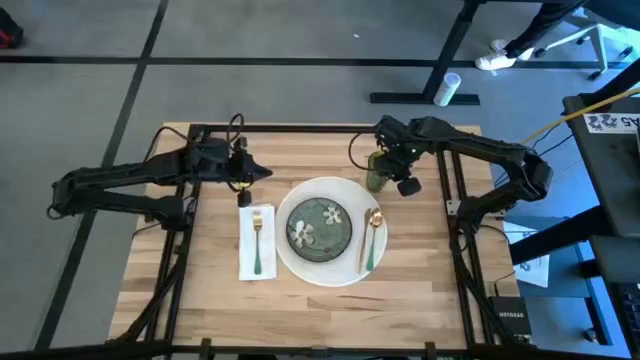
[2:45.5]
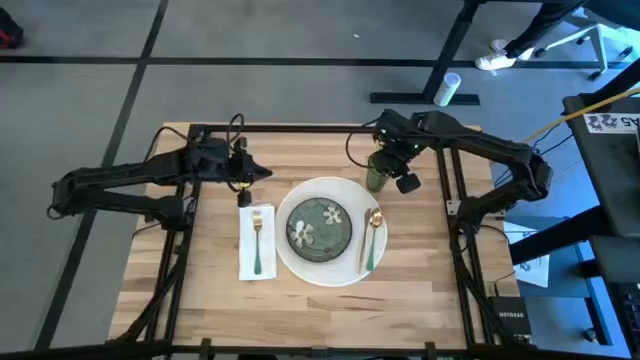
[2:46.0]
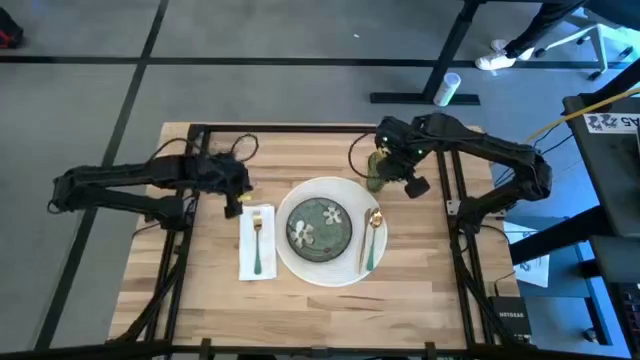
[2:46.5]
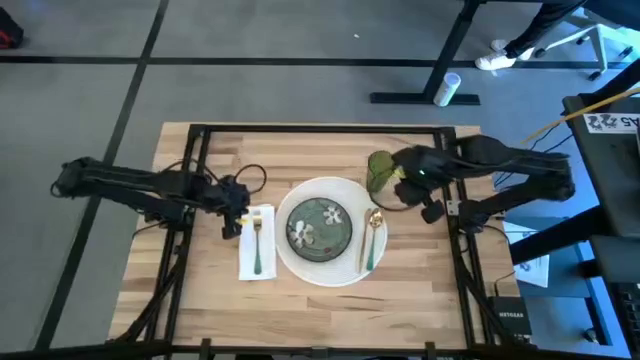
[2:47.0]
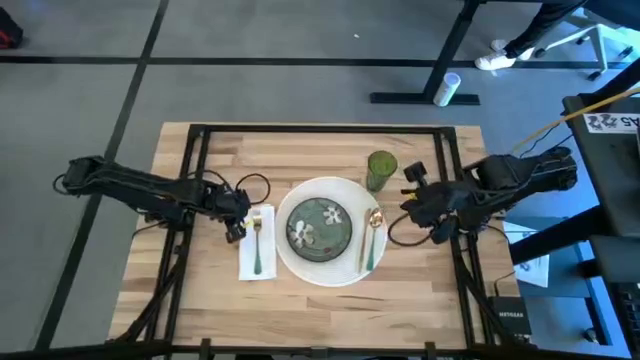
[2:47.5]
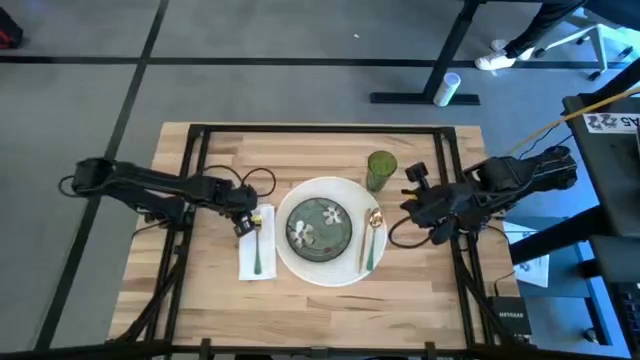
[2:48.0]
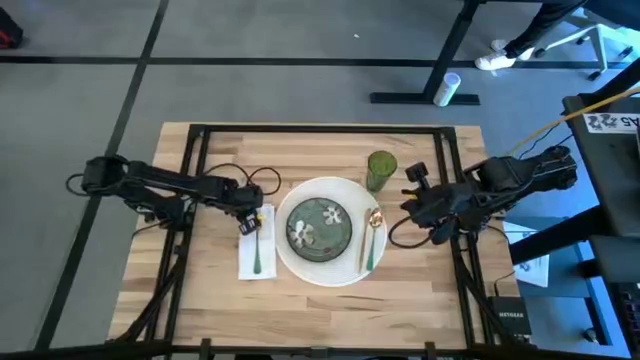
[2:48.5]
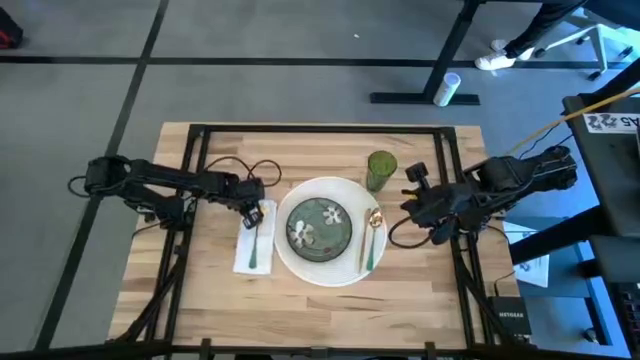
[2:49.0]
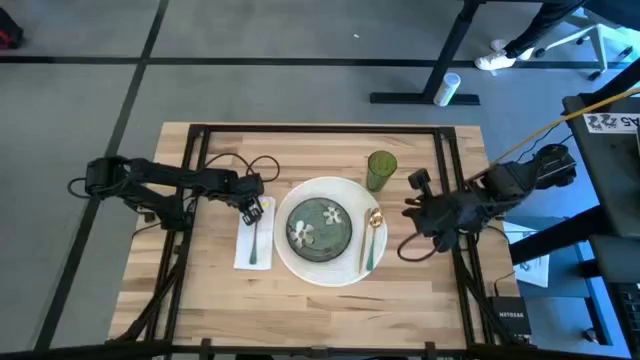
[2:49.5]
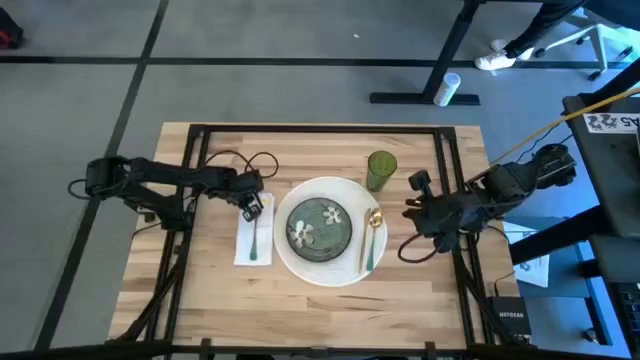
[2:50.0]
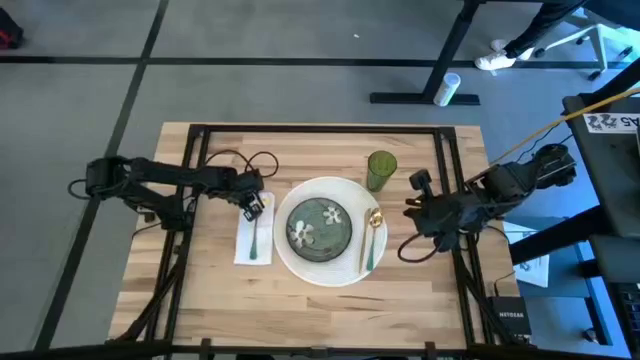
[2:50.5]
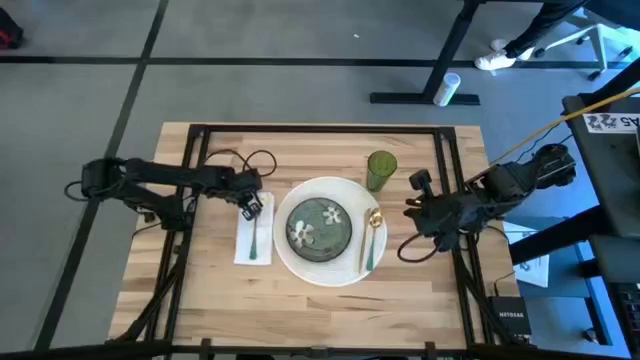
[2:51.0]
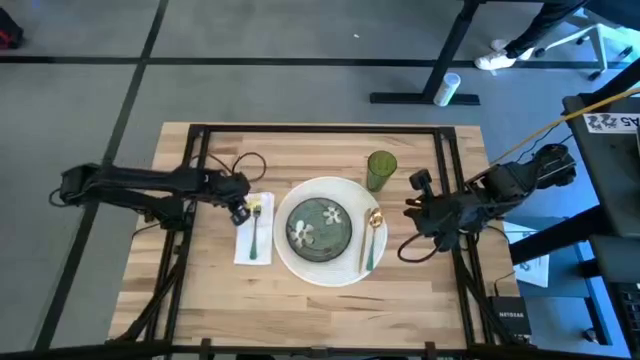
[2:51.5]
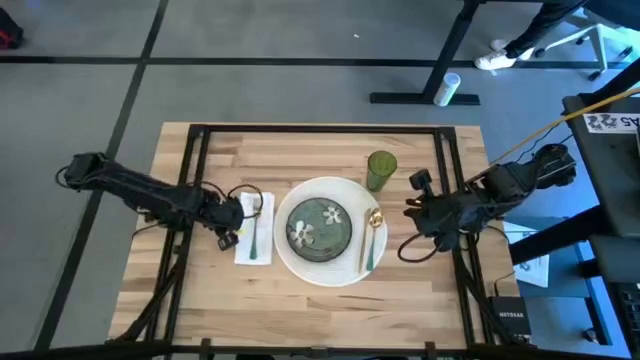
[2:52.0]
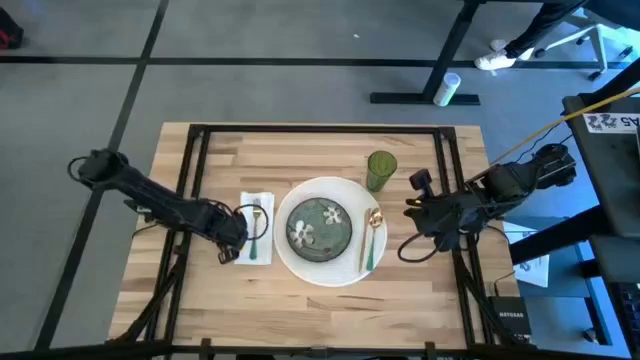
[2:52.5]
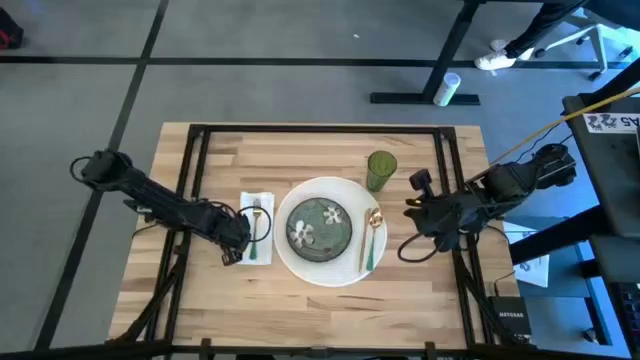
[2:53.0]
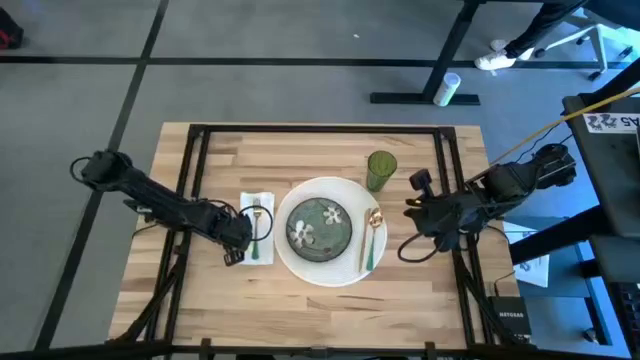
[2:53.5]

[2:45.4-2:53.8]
Task: Set table place
Adjust the white table napkin

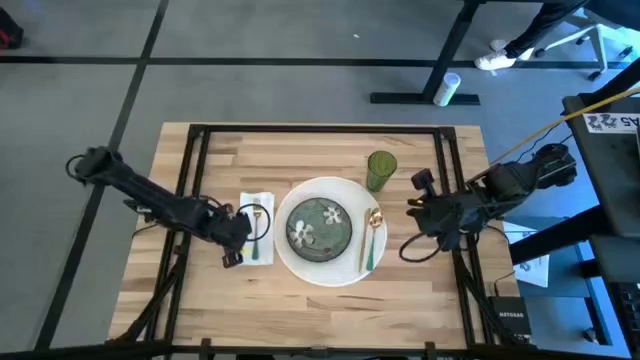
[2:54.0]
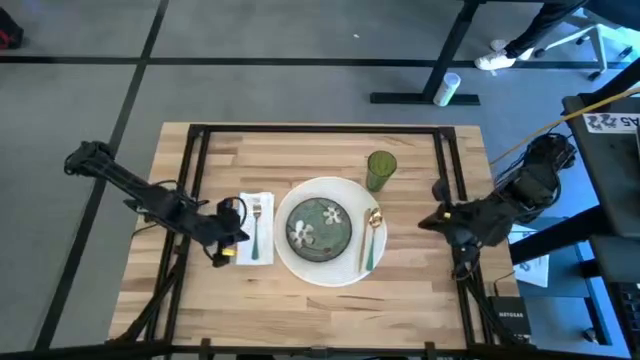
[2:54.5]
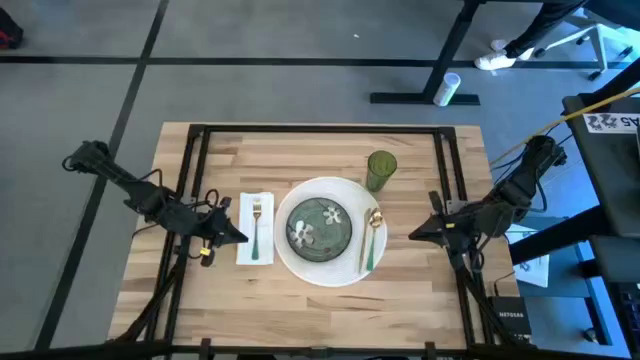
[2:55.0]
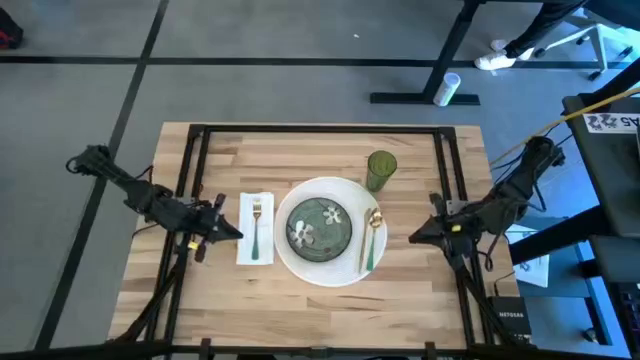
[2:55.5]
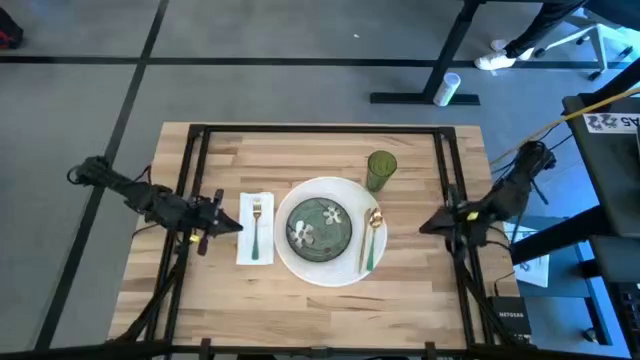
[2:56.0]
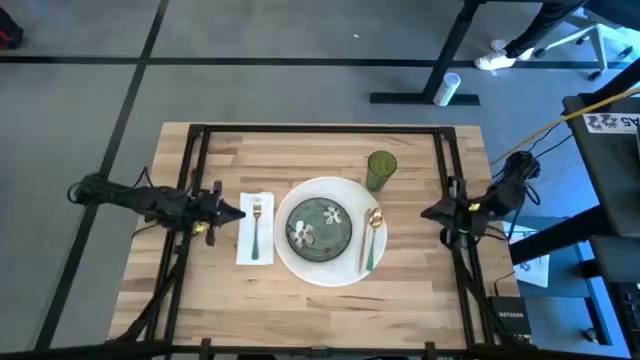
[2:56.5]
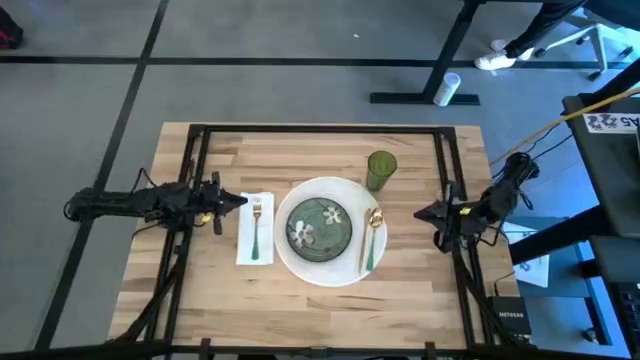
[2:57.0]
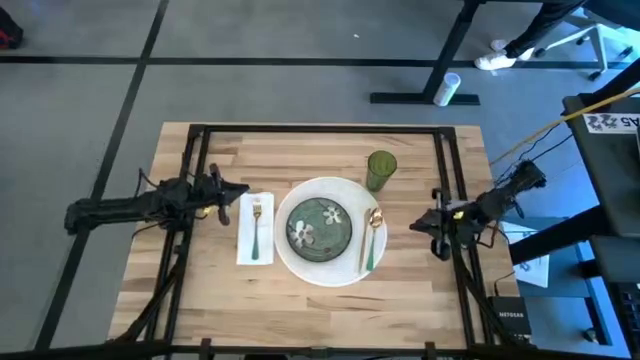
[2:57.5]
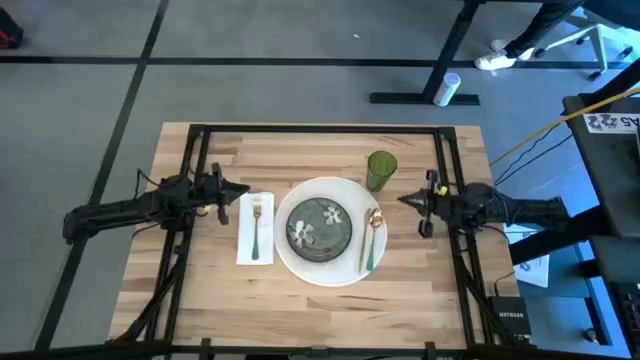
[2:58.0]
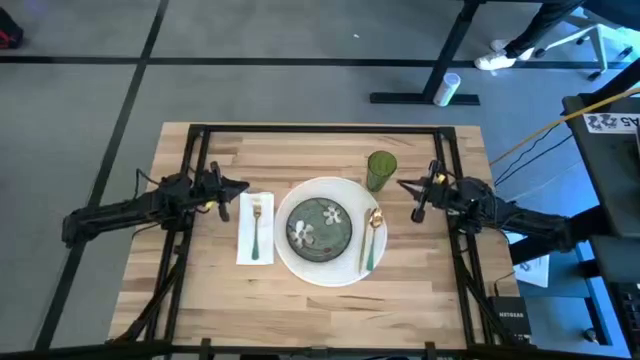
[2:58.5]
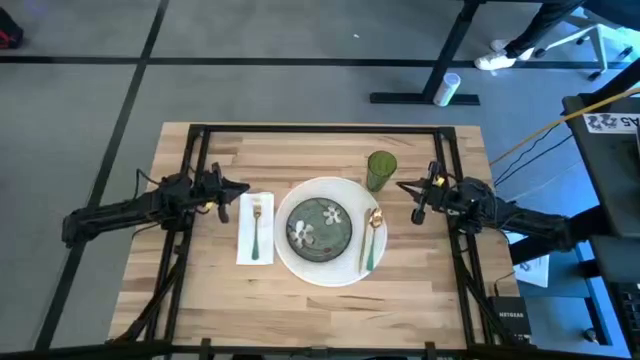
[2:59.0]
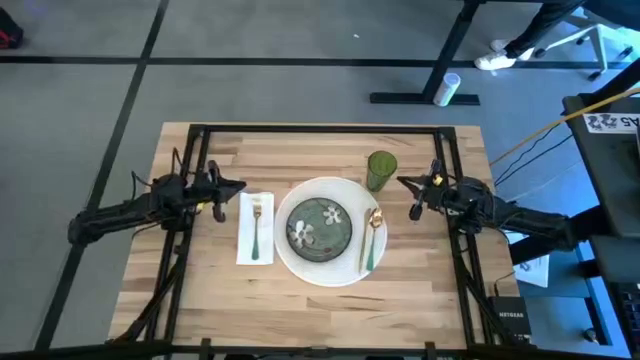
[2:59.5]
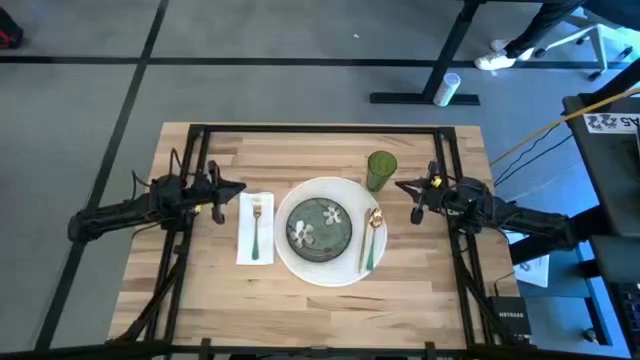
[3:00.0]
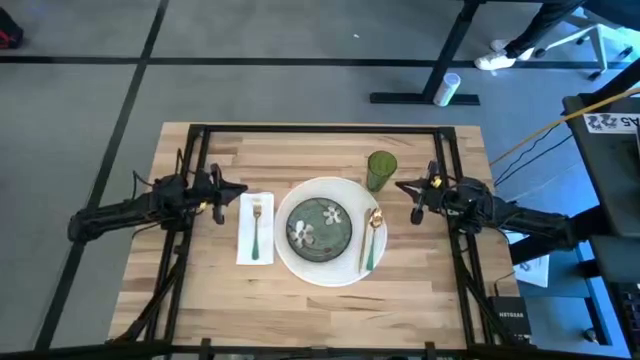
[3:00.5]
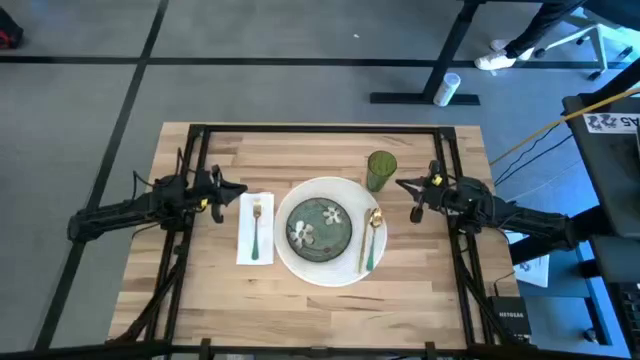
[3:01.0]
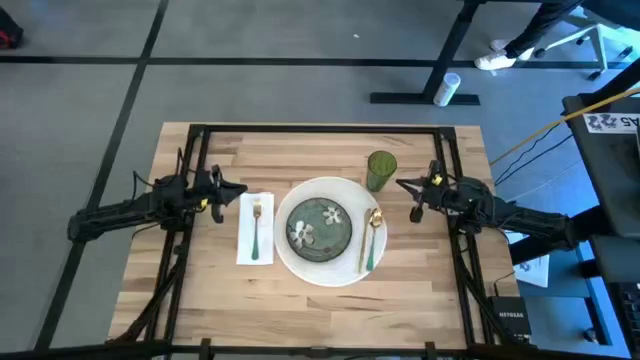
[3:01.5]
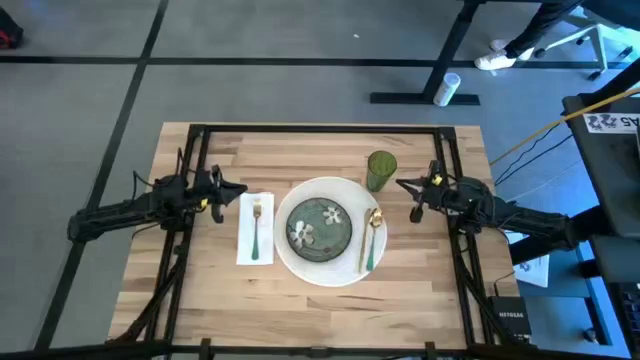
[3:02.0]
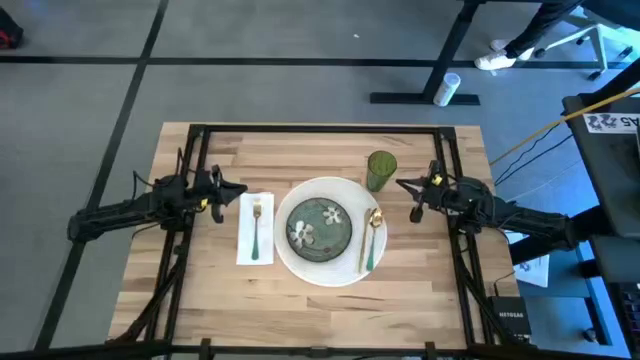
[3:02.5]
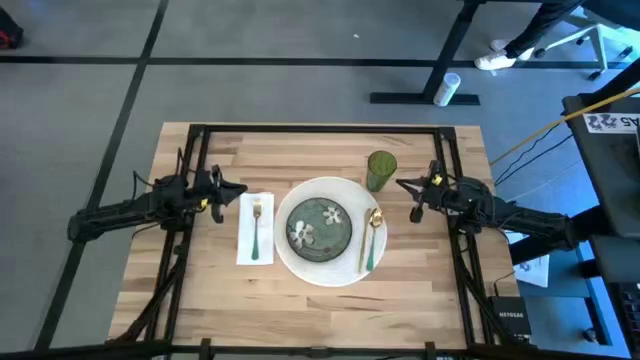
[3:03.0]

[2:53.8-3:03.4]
Return to Home Position

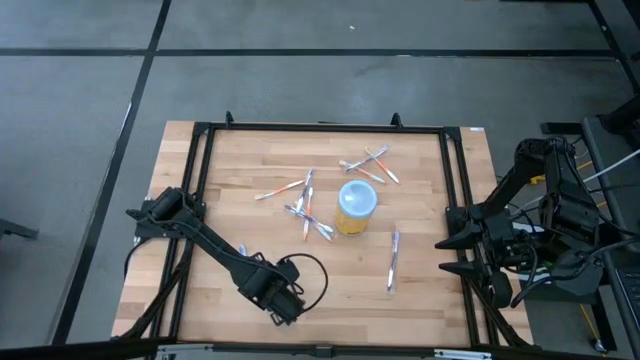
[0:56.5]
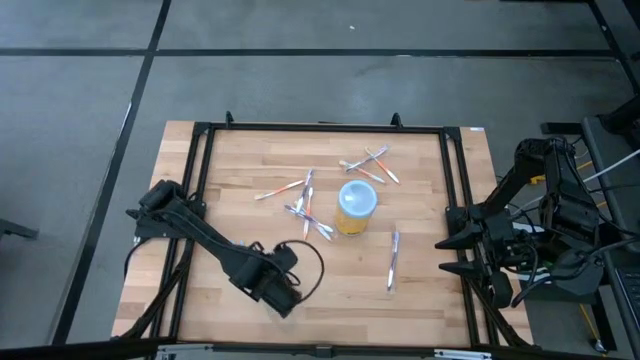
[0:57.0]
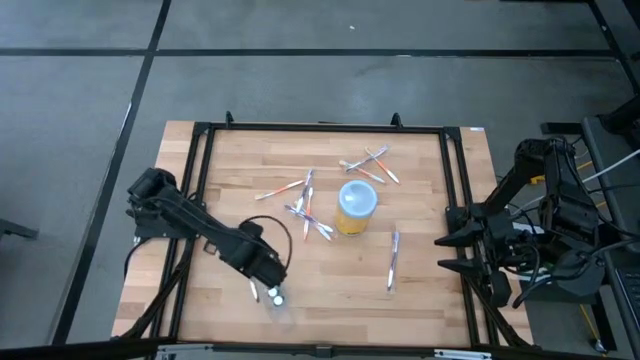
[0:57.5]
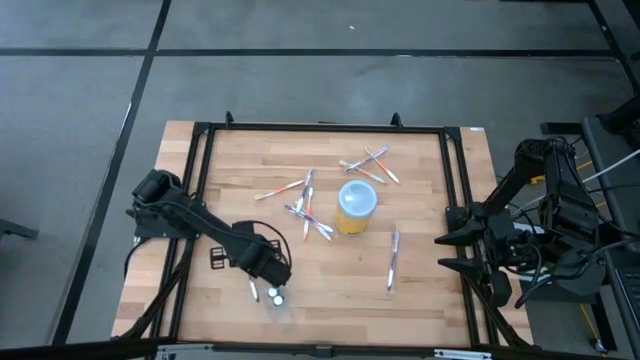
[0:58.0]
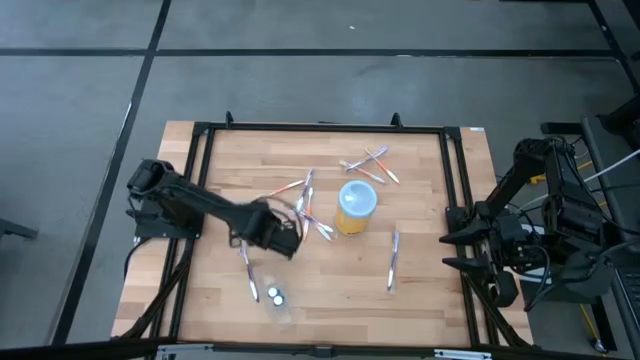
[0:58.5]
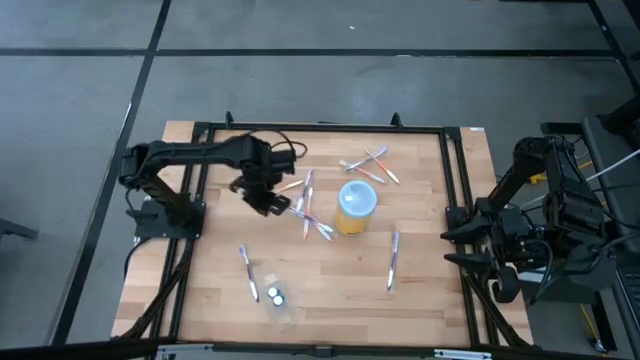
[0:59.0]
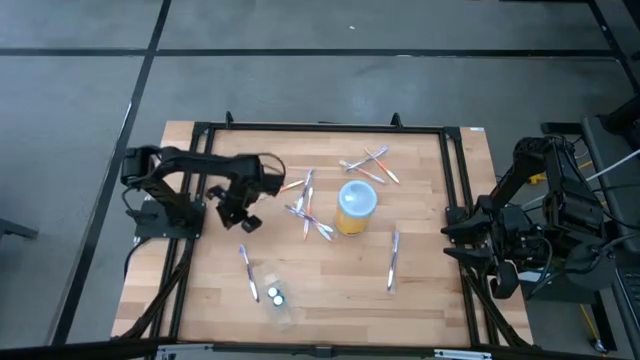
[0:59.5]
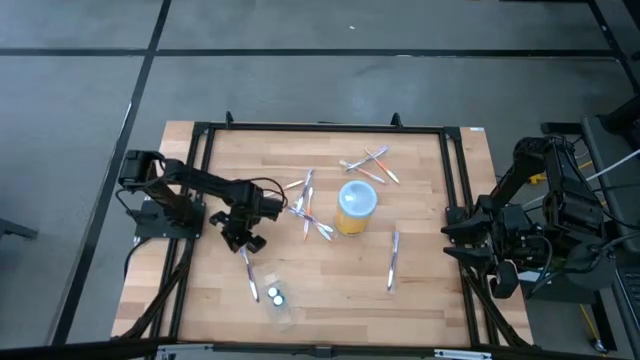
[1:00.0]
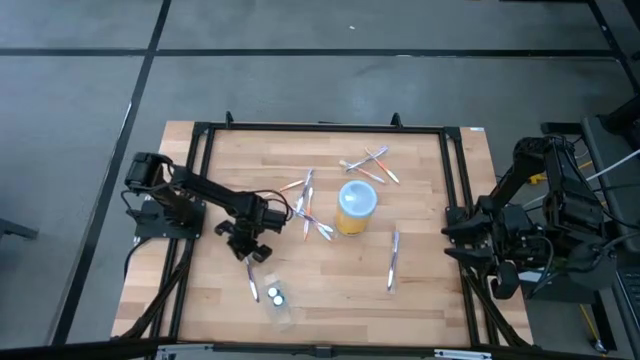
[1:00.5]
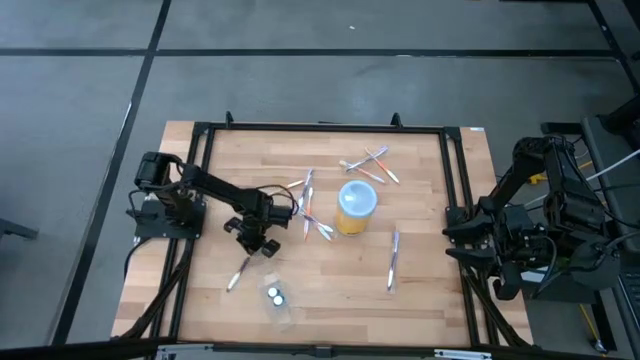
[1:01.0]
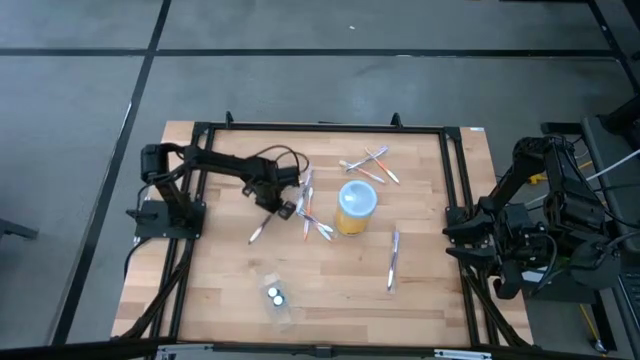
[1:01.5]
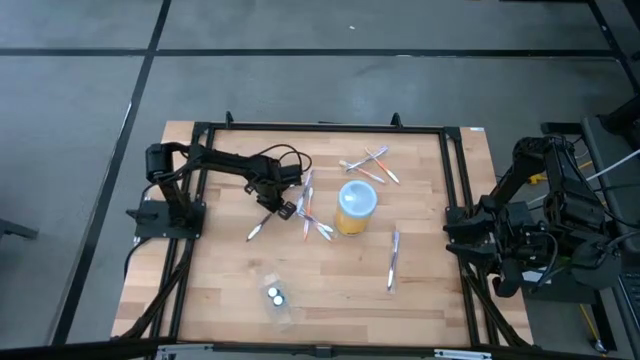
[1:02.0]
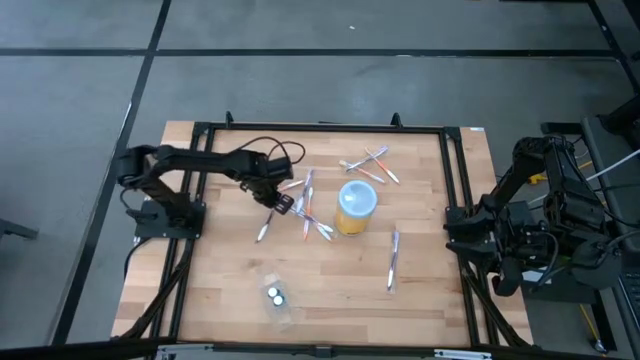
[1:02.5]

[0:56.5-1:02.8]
Task: Pick & Place toothbrushing station
Put the violet toothbrush into the left side of the transparent organizer
